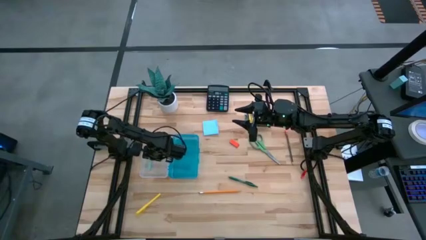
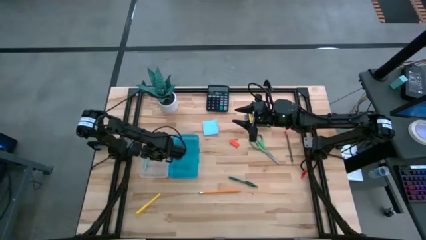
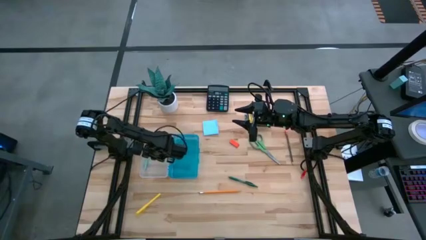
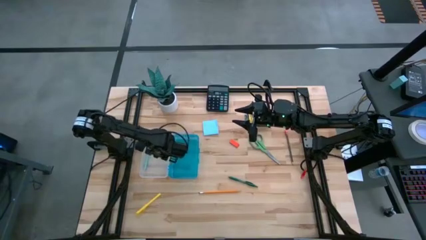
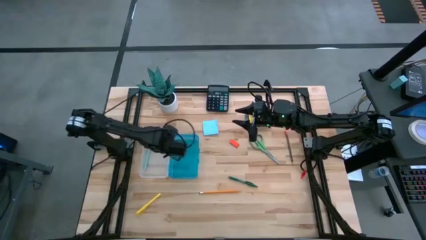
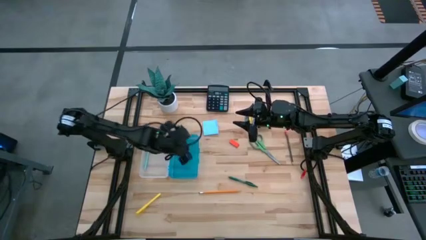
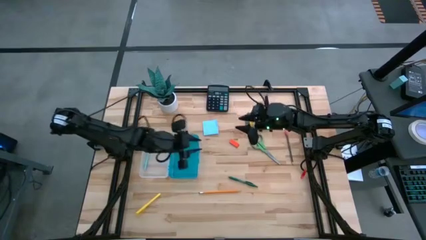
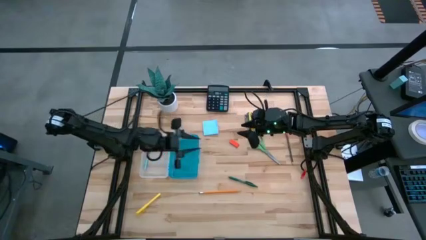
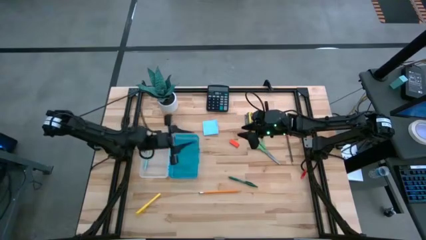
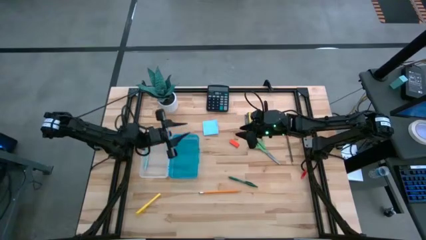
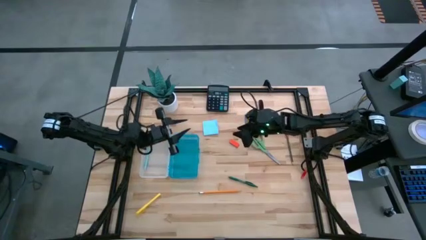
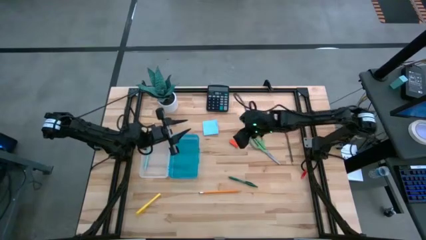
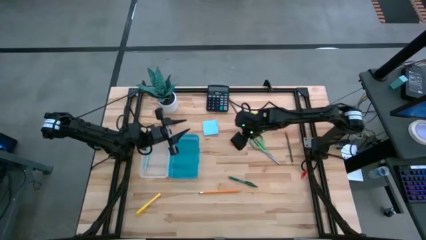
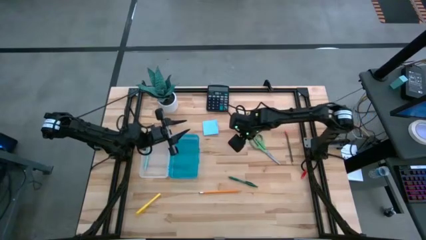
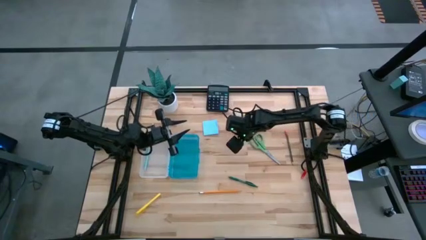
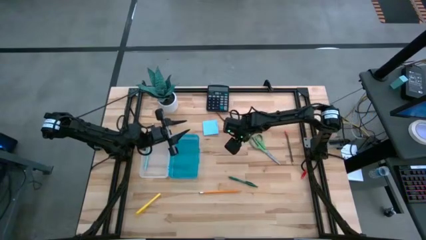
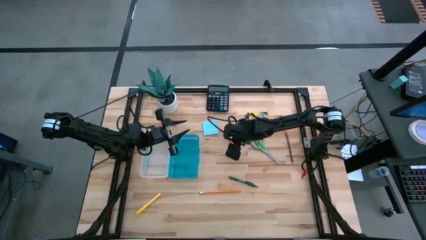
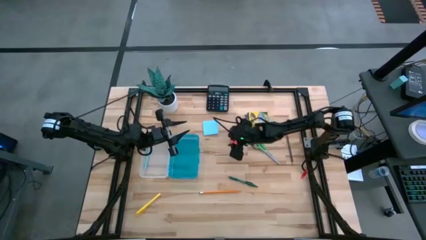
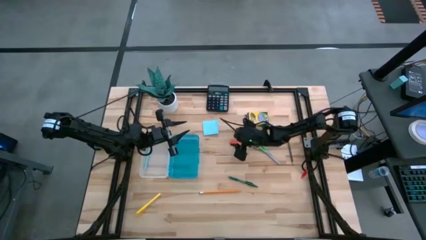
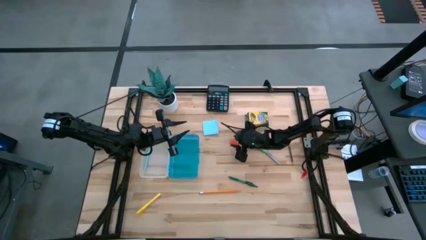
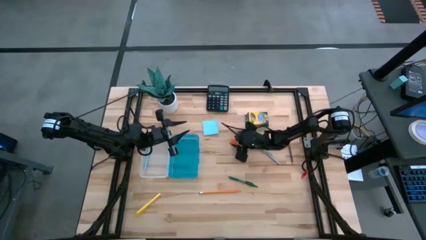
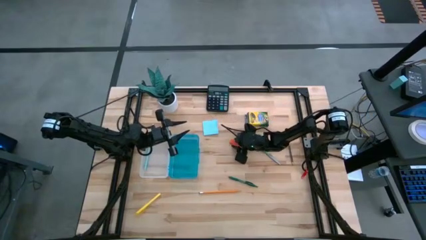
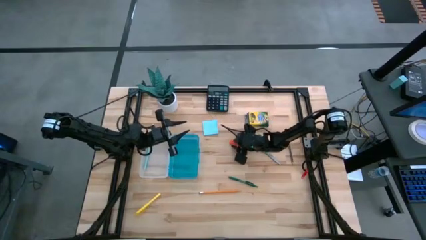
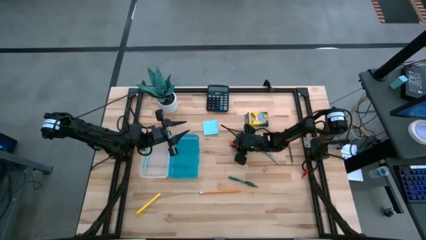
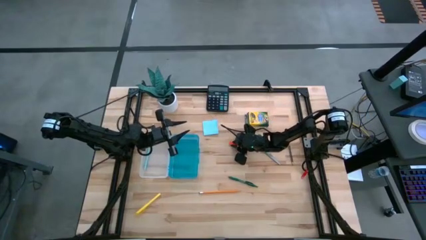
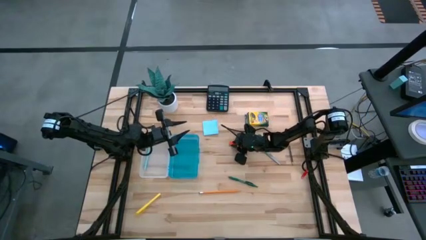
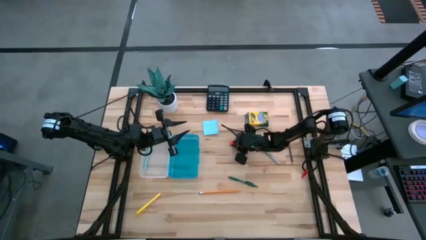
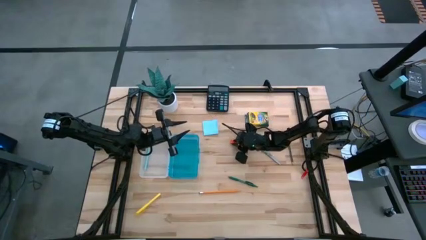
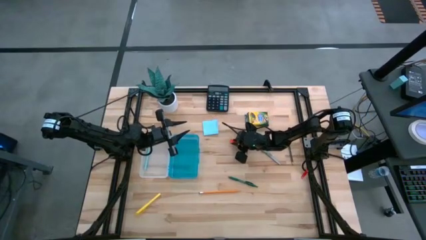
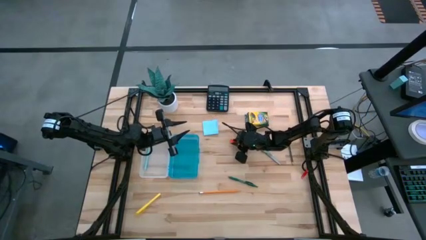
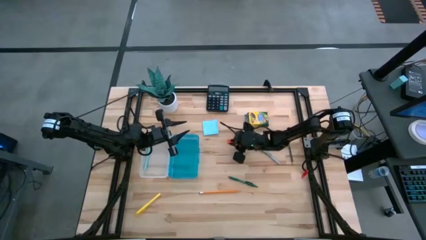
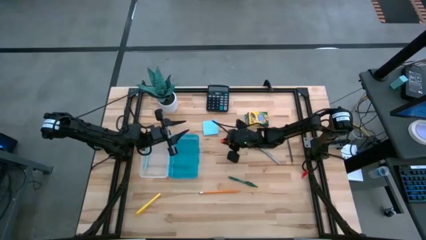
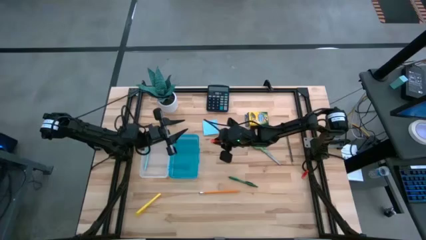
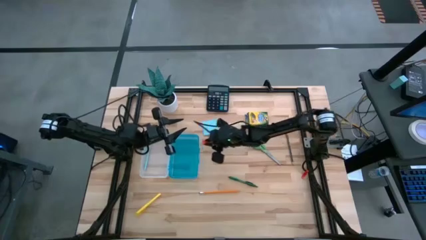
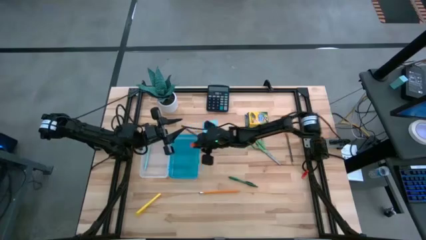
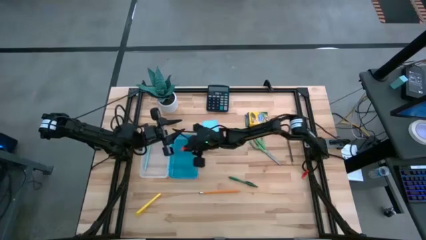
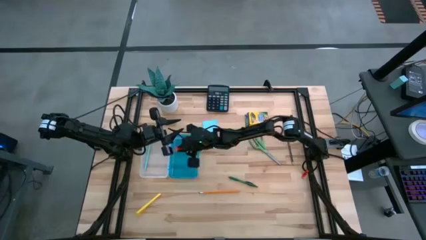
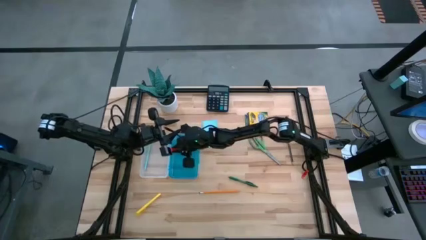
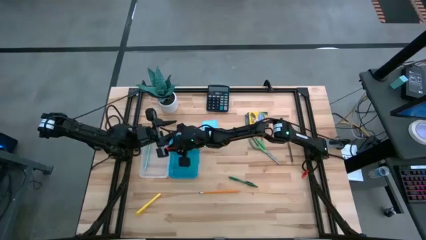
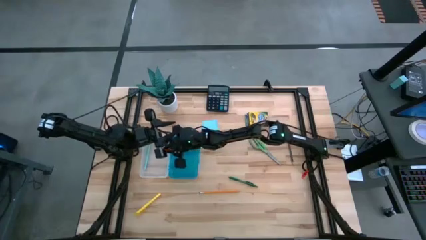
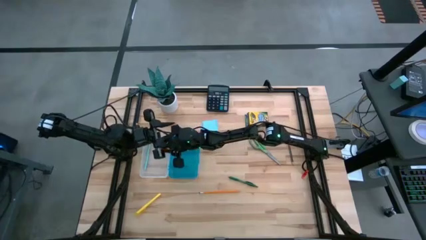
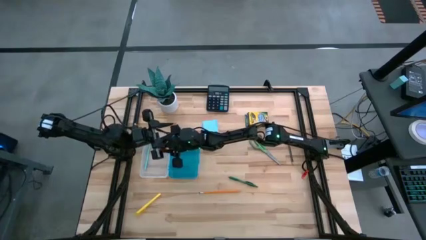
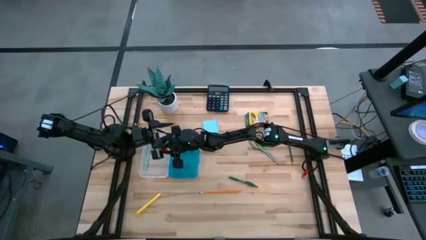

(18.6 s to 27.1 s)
Task: Pack school essentials
Put the orange eraser into the blue supply box

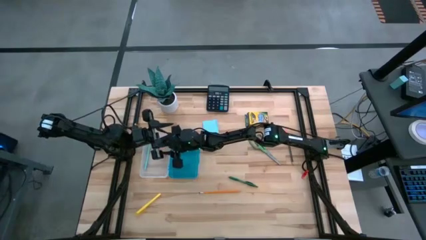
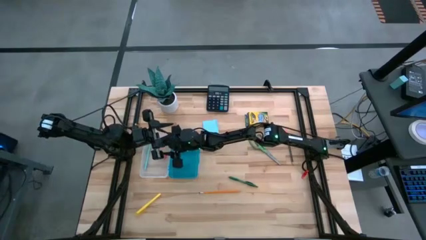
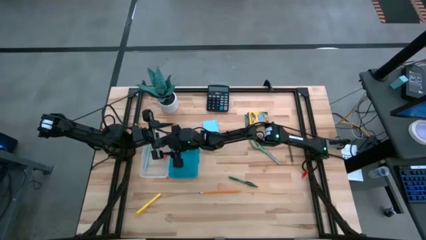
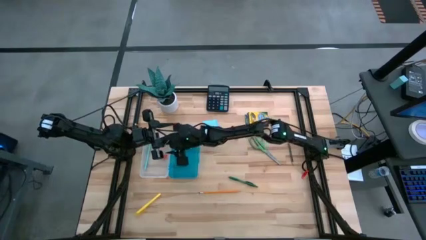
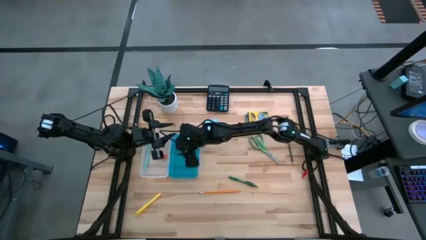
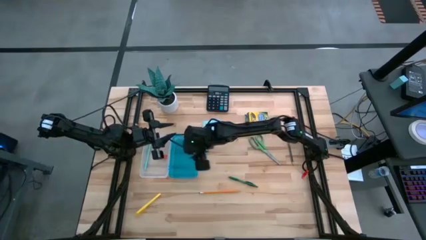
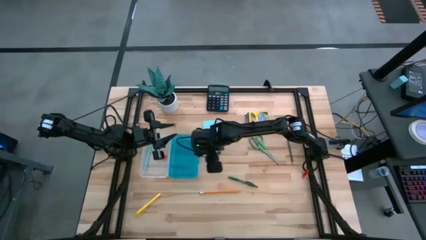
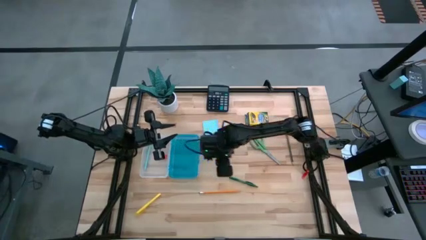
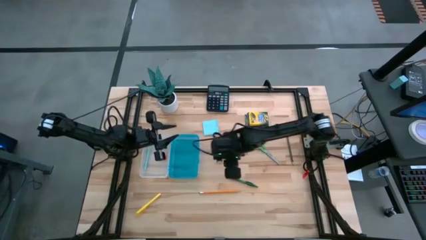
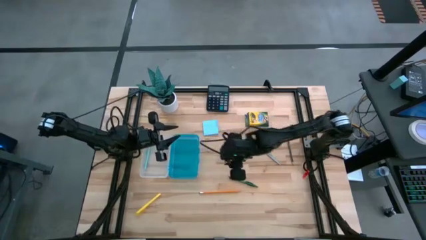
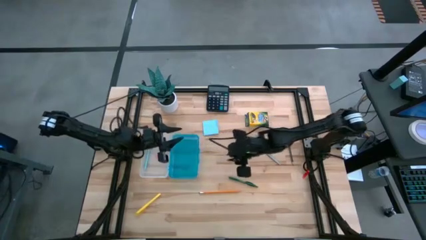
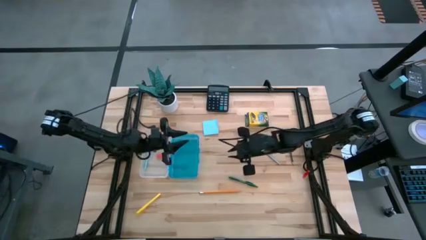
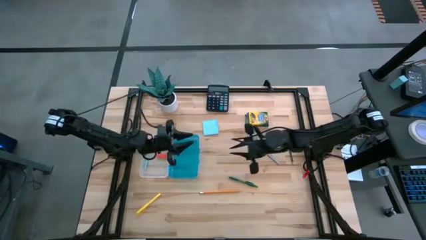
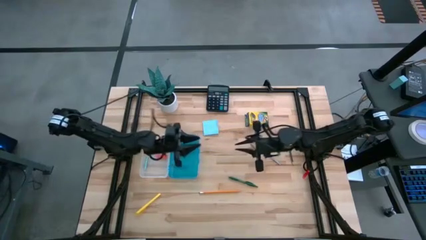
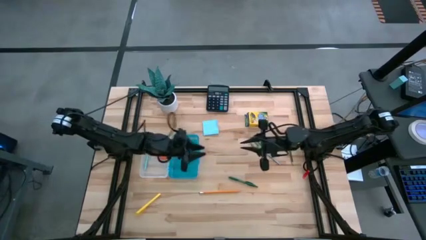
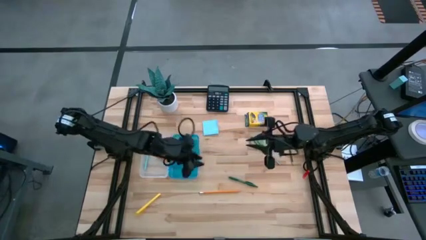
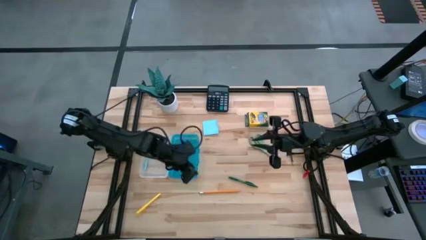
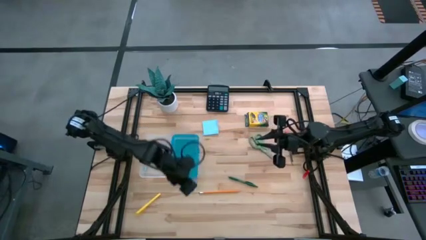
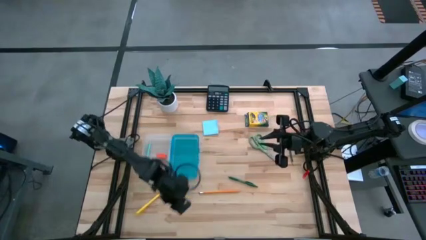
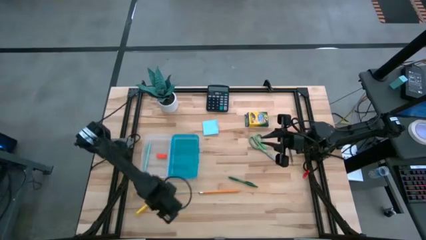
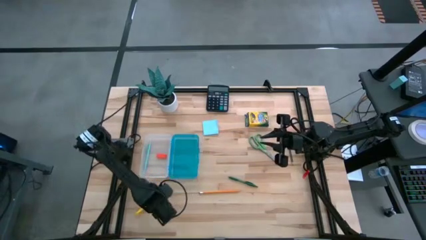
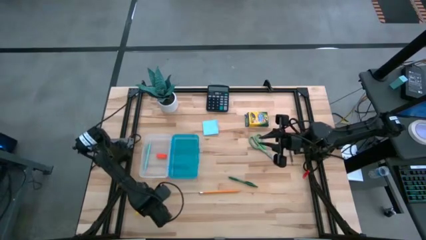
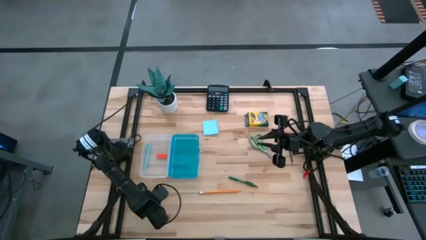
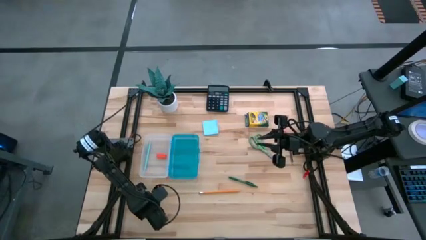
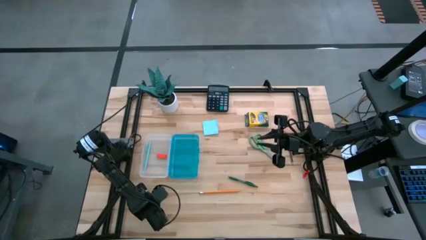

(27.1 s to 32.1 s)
Put the yellow pen into the blue supply box

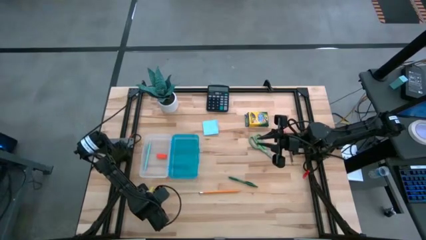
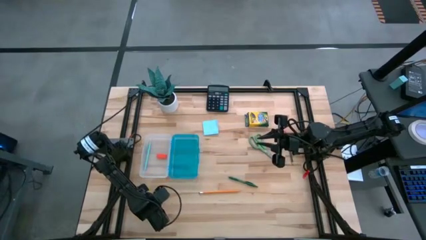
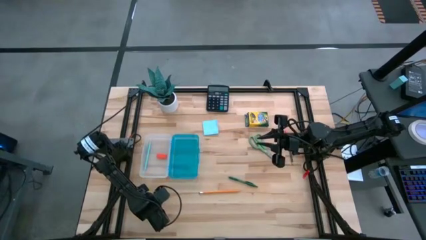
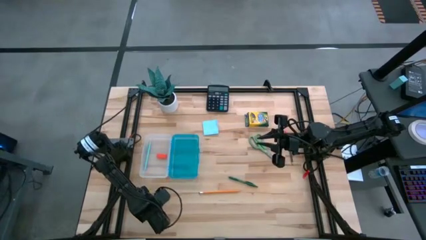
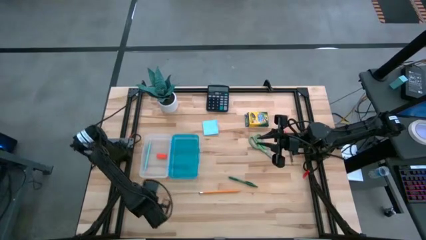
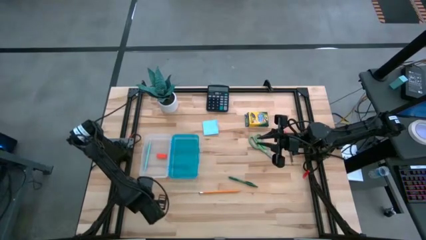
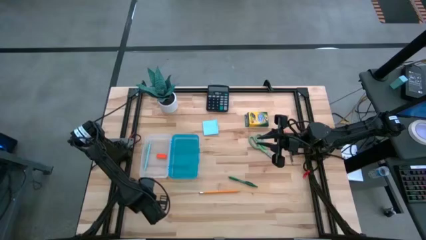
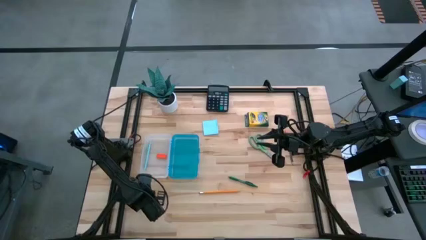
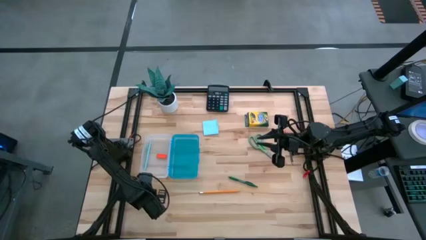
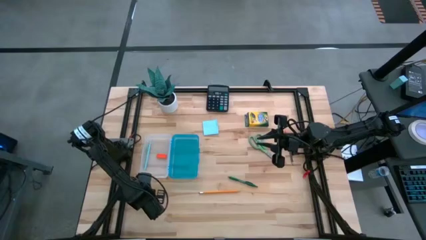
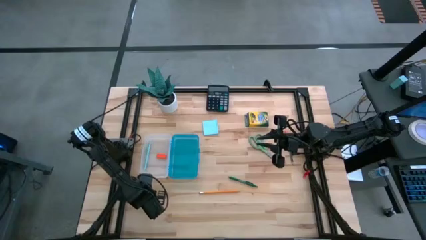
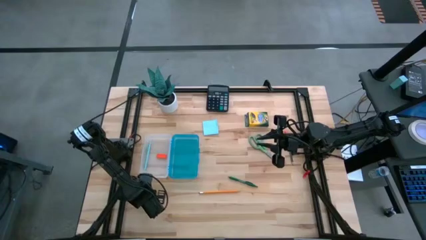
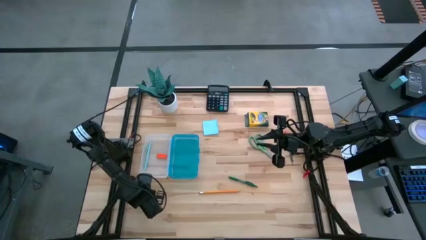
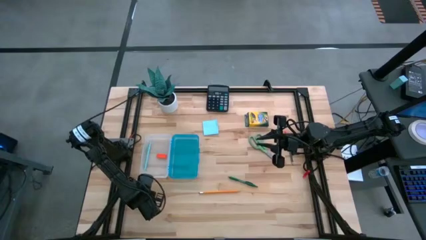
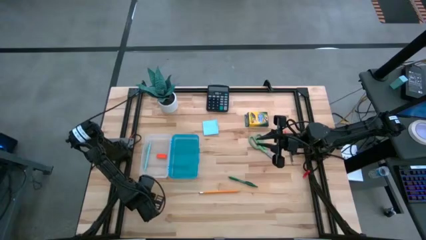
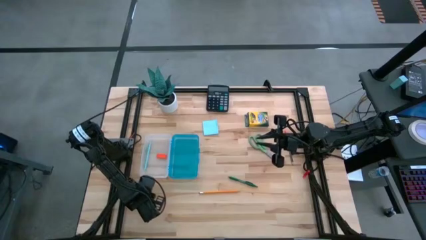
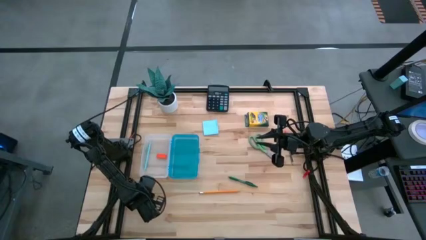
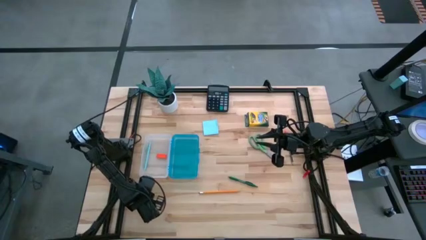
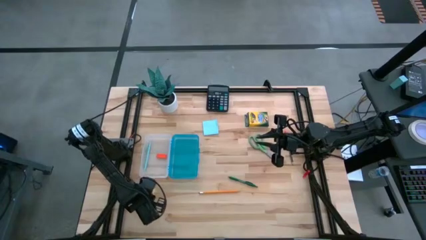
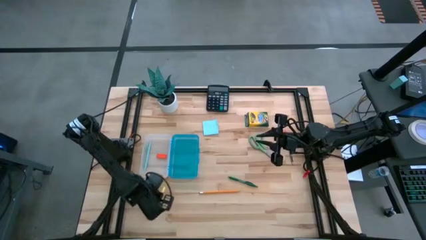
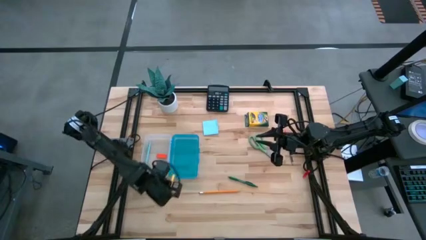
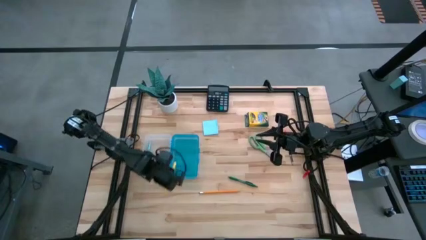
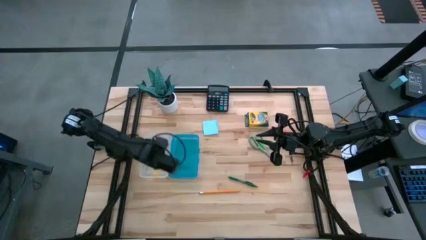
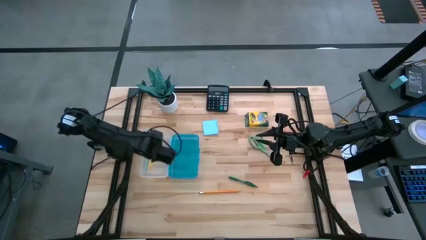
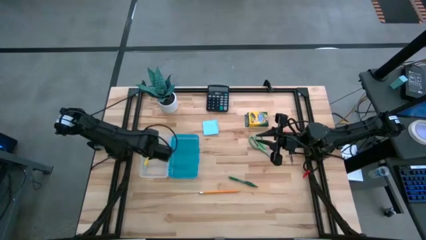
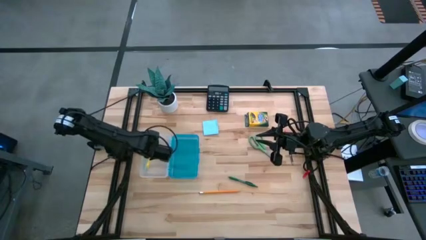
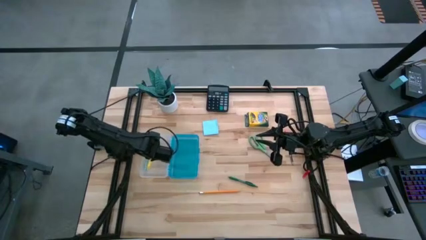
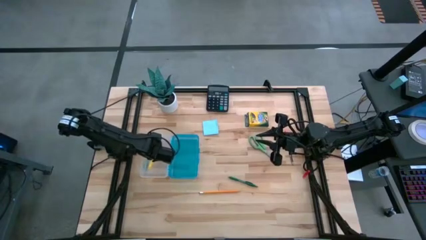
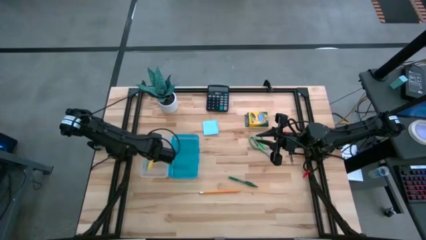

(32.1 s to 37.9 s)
Put the yellow pen into the blue supply box
